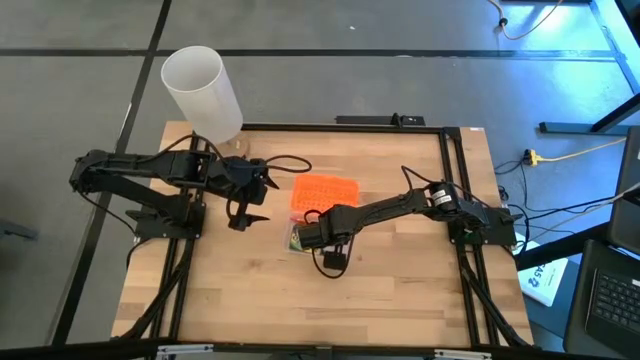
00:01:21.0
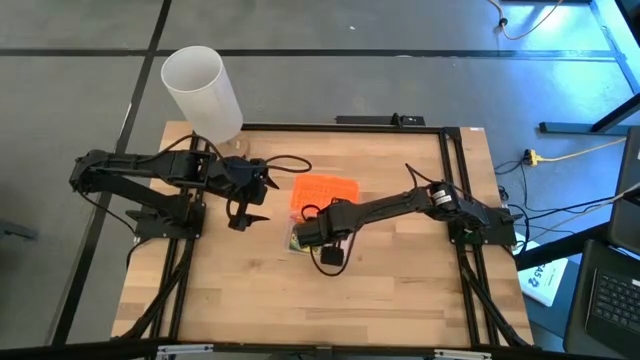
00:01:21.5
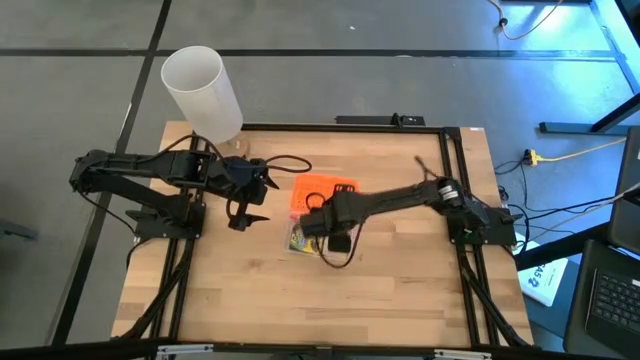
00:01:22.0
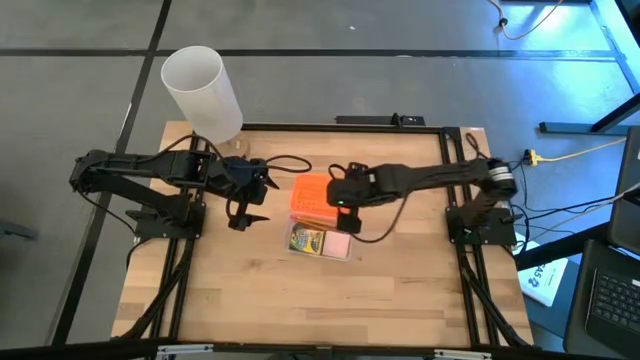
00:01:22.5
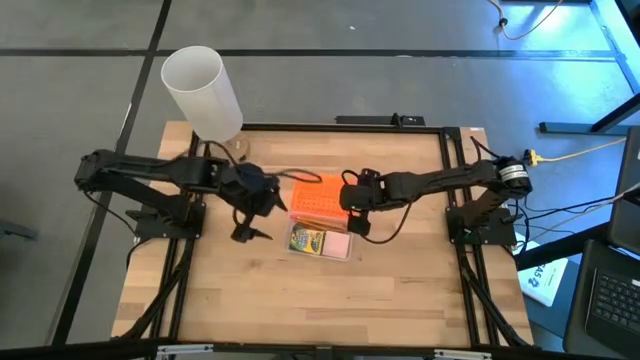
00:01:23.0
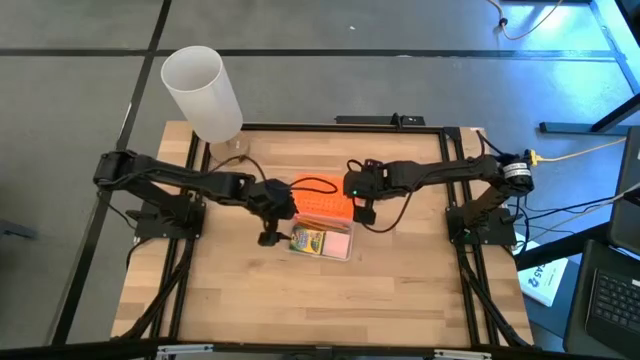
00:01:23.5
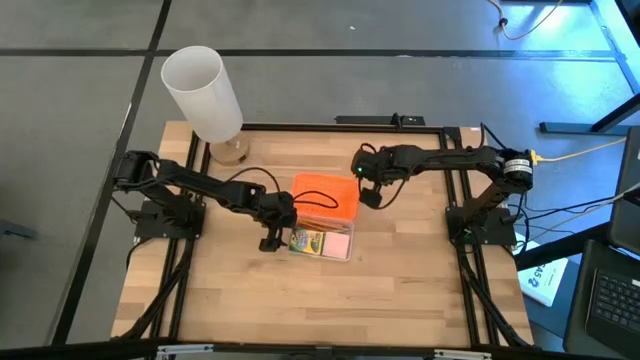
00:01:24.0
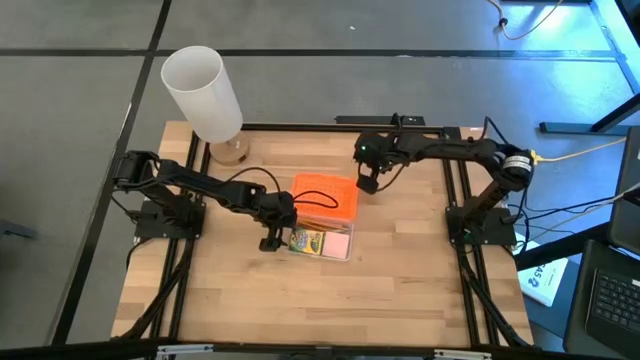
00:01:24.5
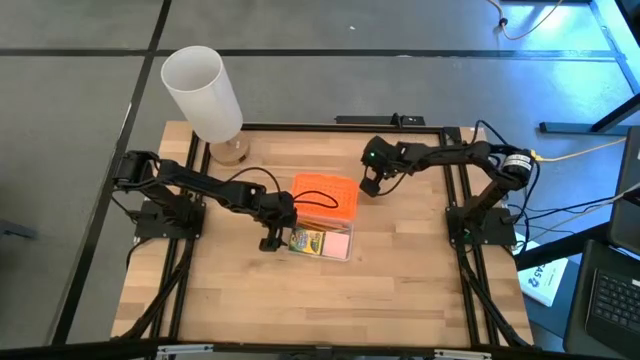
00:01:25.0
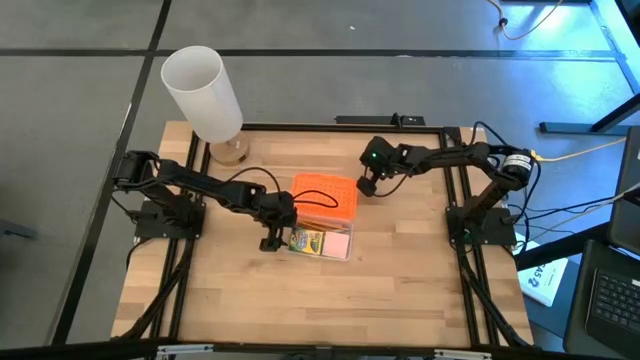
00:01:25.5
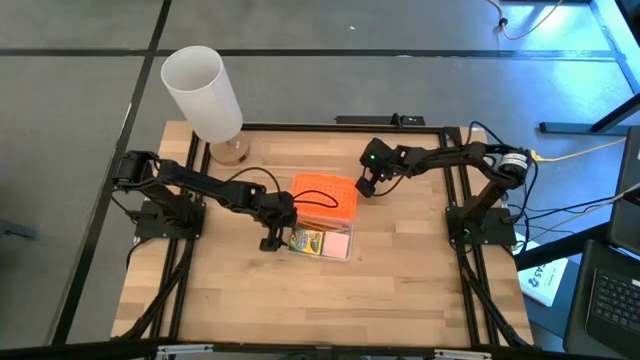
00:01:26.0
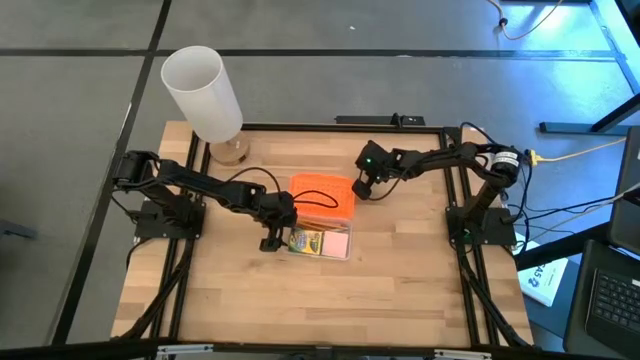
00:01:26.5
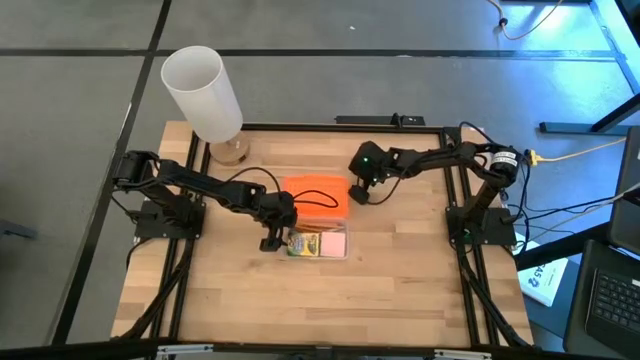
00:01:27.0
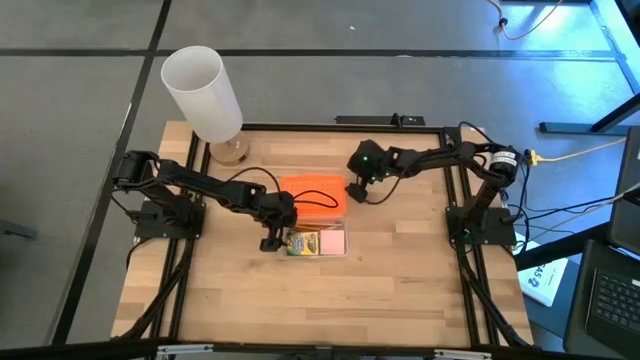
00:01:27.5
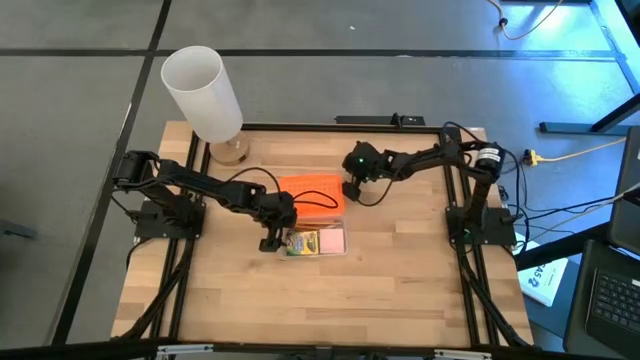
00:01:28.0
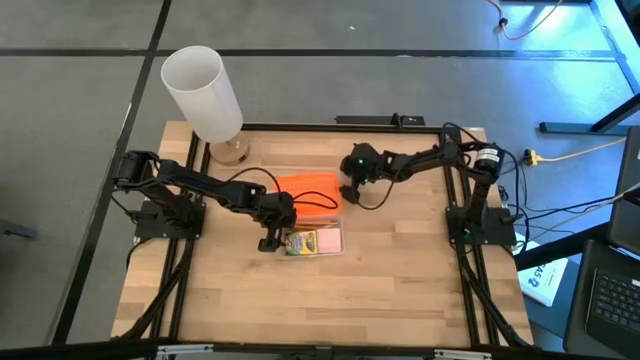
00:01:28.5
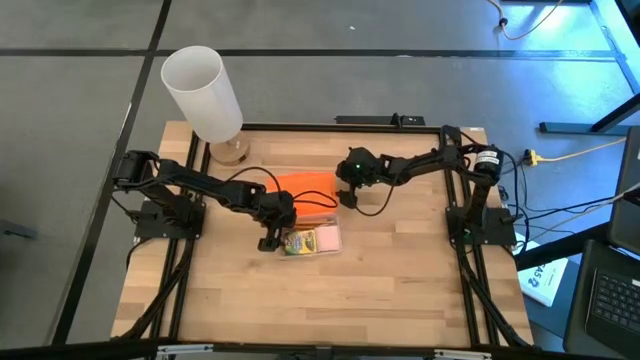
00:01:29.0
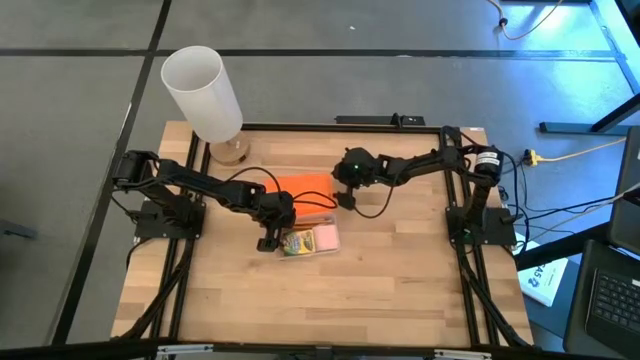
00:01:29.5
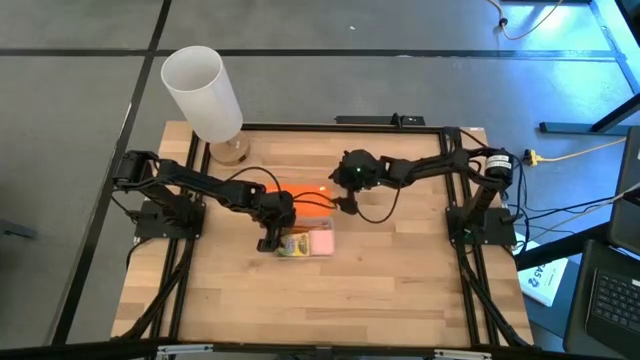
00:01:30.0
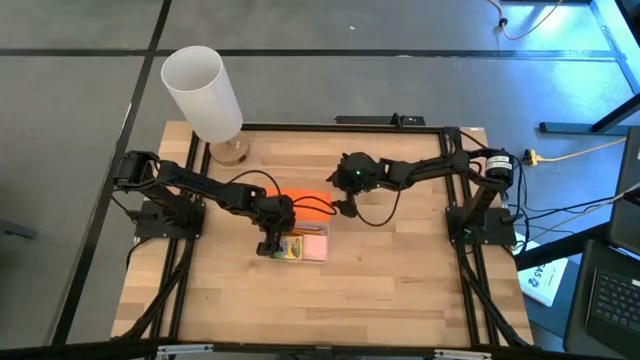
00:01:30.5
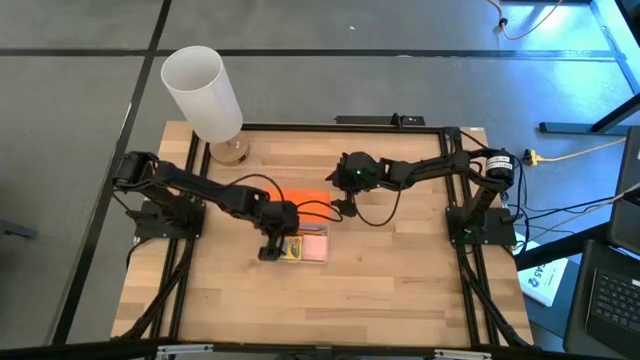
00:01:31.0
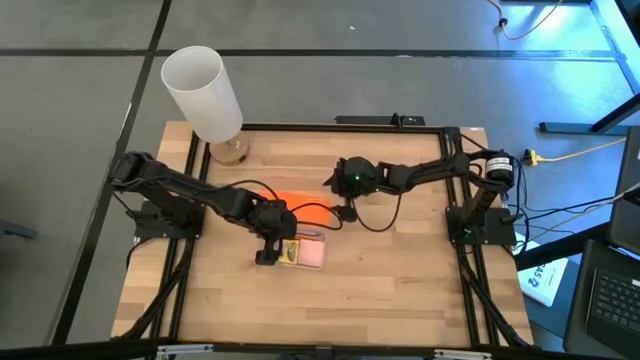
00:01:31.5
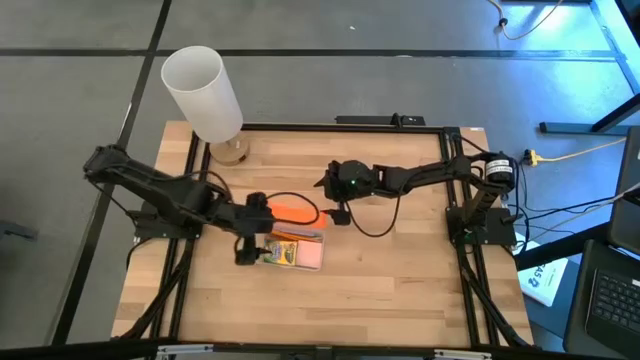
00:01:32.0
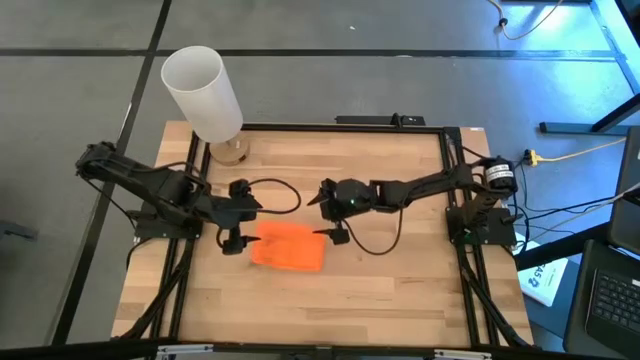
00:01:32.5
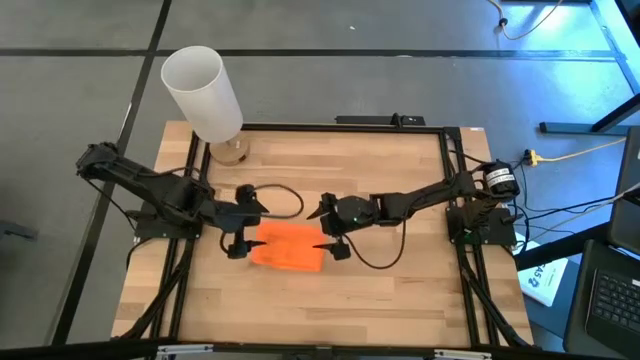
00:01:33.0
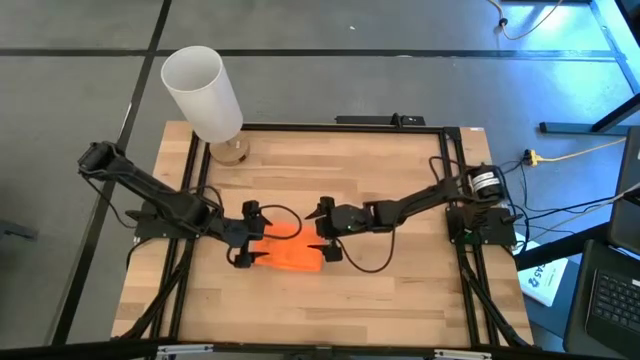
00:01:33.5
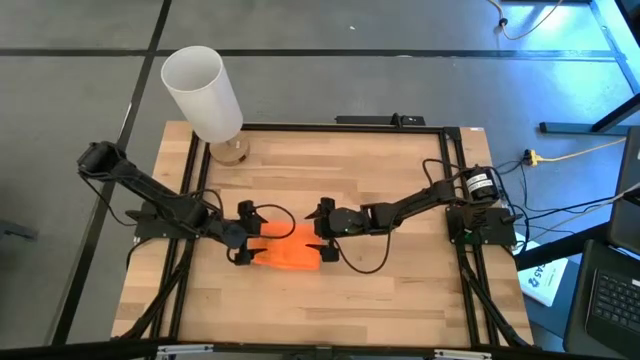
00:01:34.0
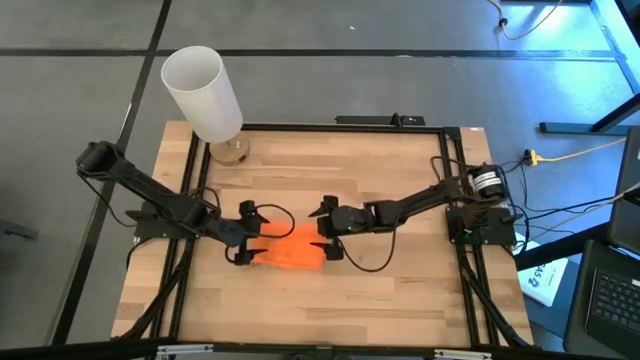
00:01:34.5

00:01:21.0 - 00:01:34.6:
Task: Pack school essentials
Close the orange supply box

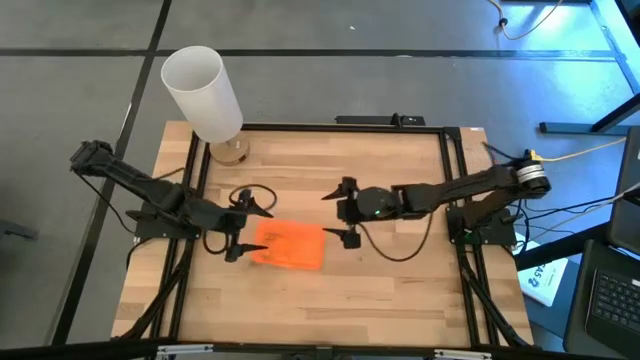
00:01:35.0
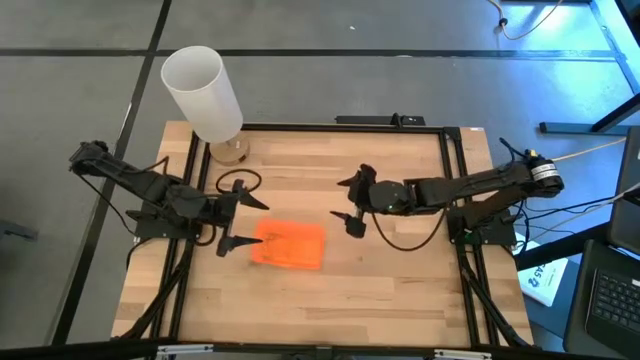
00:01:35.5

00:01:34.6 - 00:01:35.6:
Return to Home Position

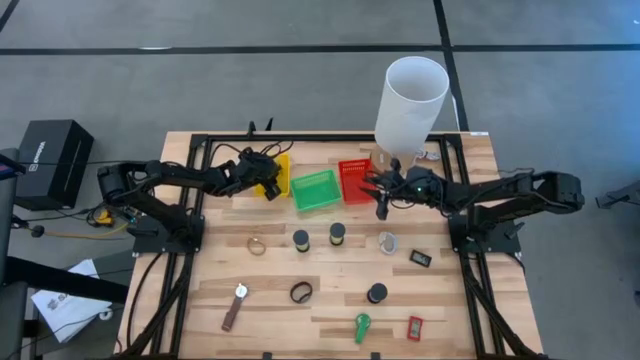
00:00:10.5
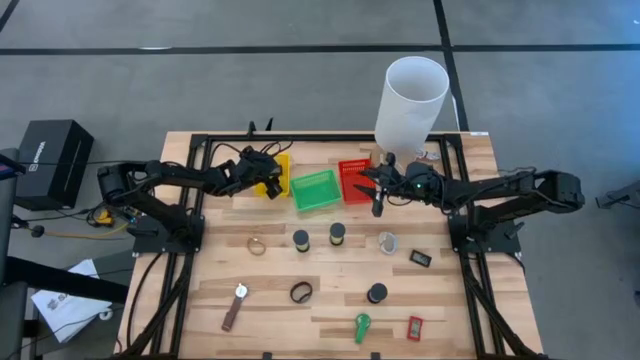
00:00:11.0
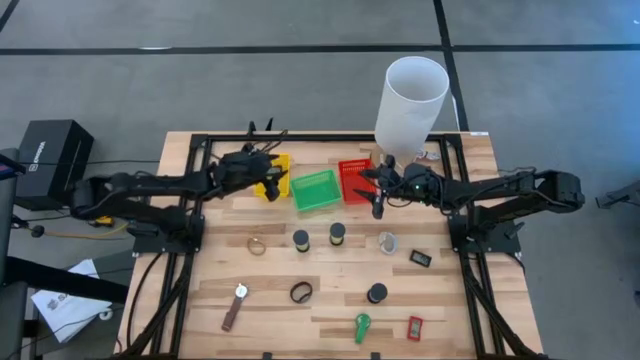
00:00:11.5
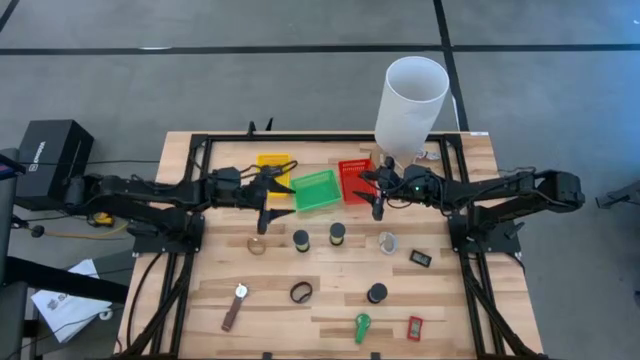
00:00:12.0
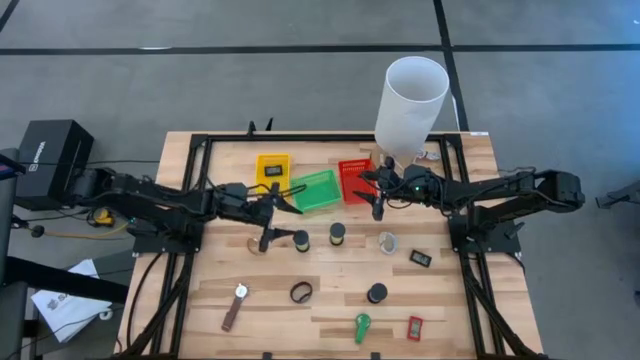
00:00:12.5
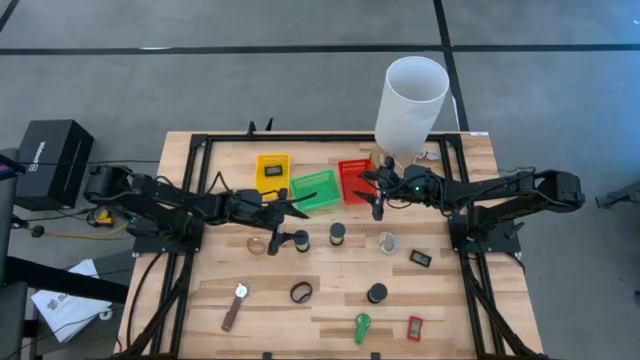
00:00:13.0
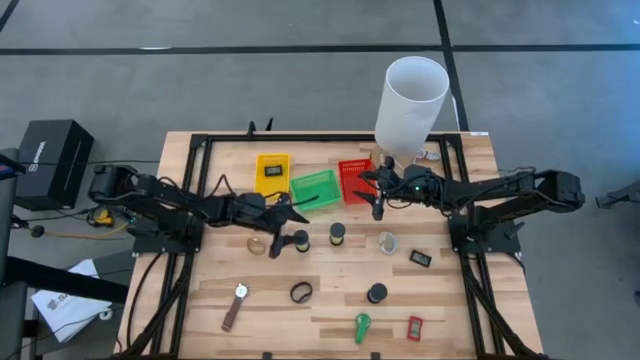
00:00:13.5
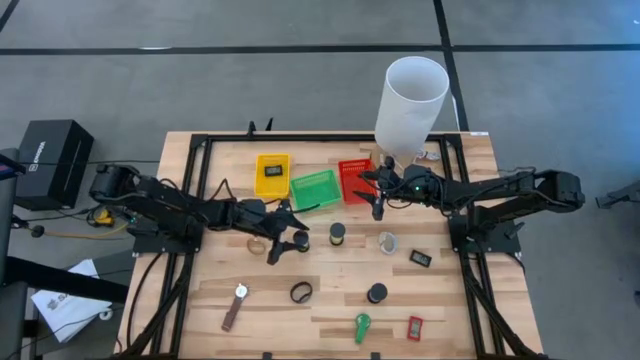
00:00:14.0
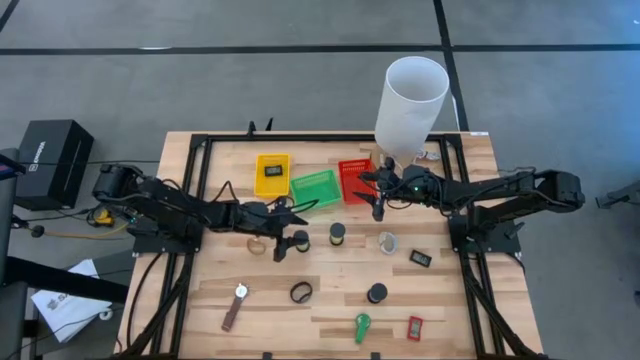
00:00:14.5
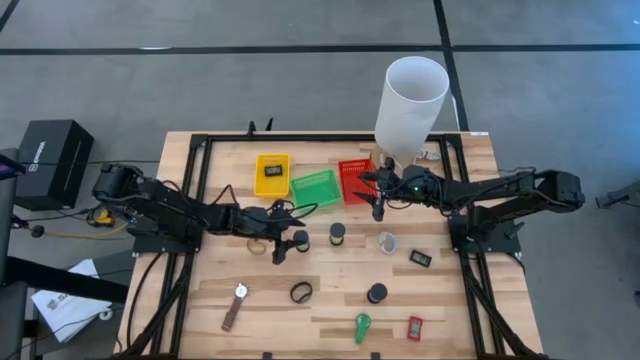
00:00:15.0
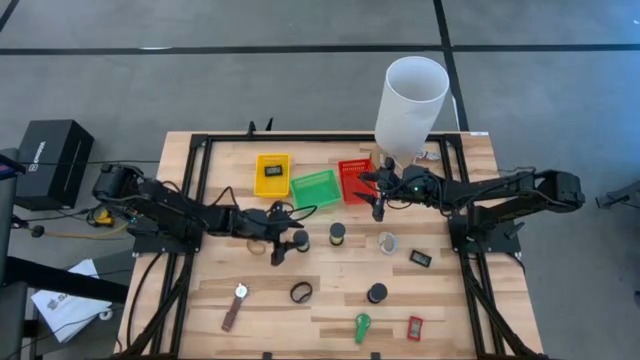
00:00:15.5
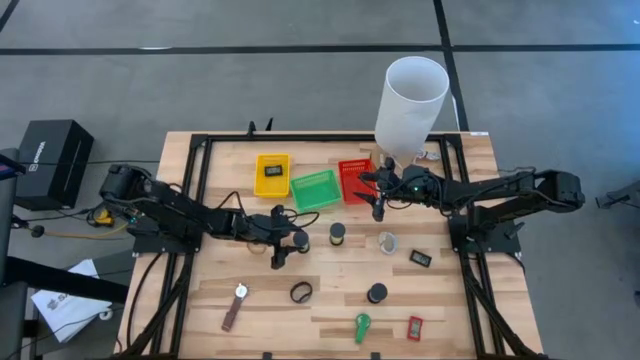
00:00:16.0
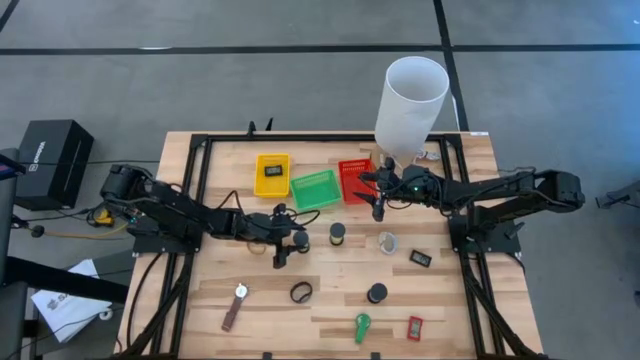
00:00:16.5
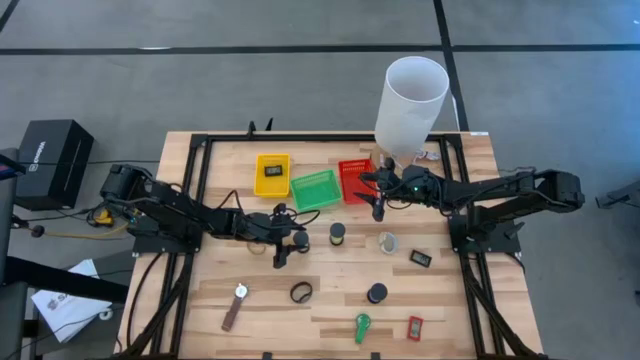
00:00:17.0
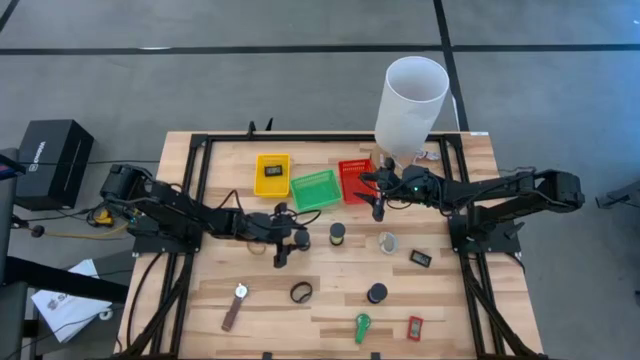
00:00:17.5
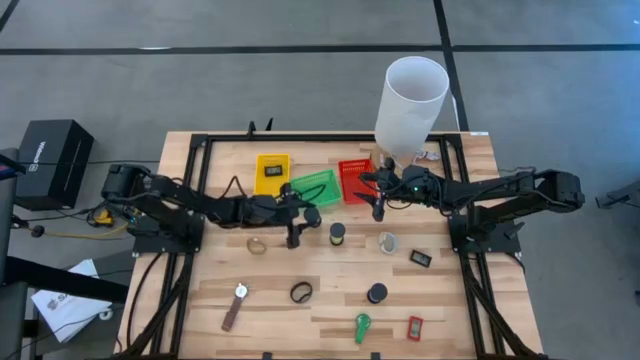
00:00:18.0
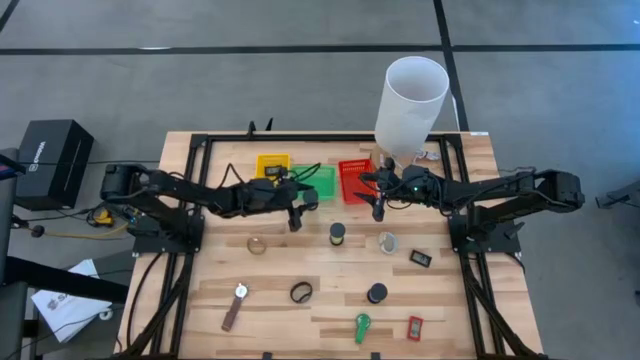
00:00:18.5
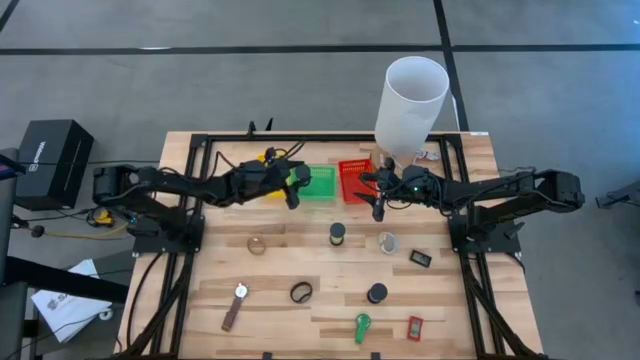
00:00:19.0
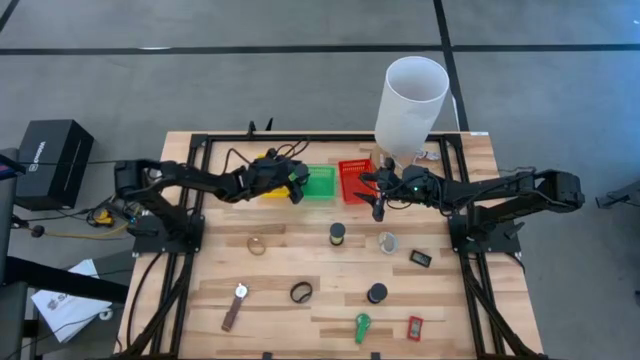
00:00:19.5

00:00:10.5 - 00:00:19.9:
Task: Pick & Place Office items
Put the left green hourglass into the green basket
